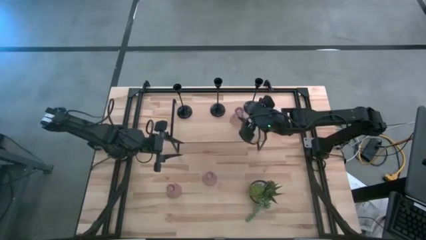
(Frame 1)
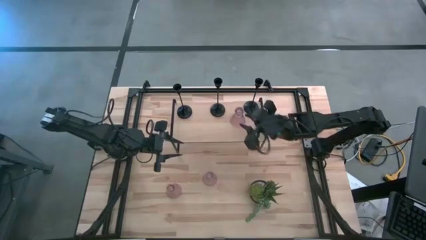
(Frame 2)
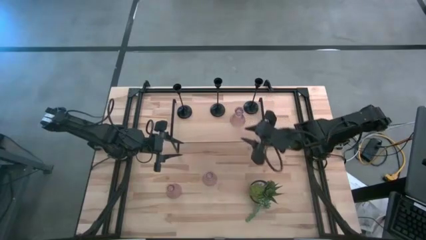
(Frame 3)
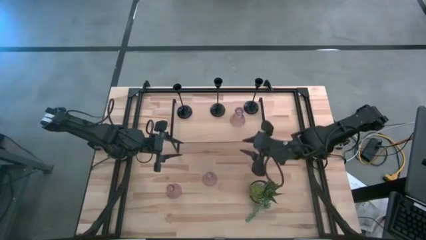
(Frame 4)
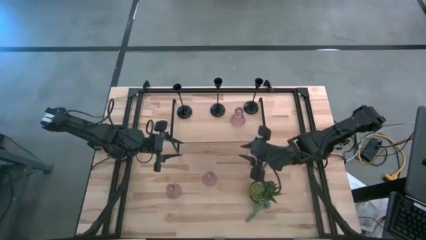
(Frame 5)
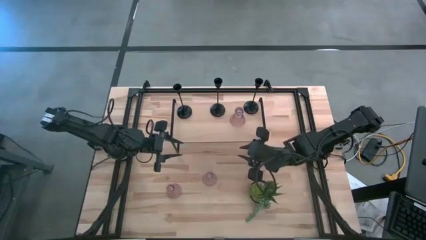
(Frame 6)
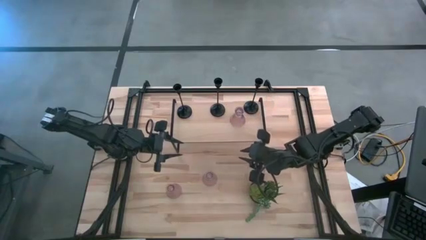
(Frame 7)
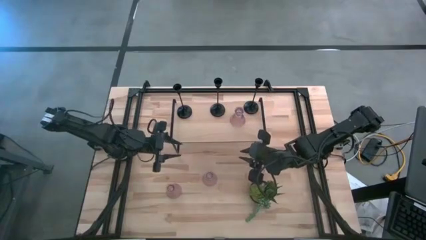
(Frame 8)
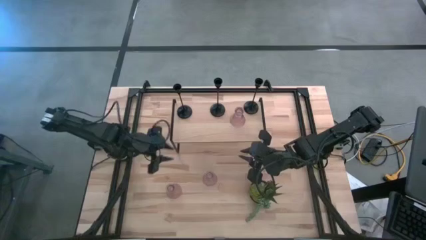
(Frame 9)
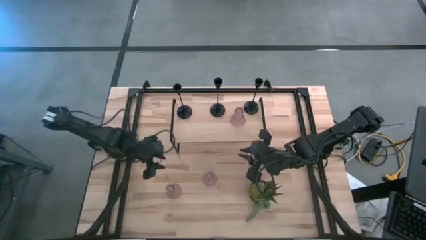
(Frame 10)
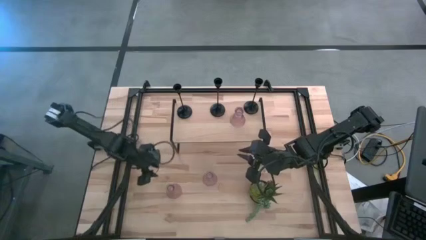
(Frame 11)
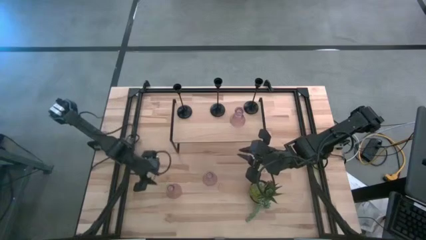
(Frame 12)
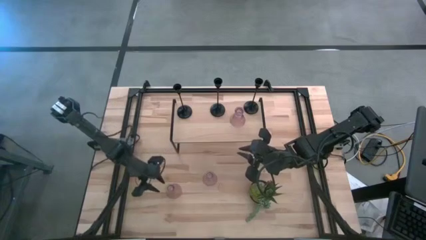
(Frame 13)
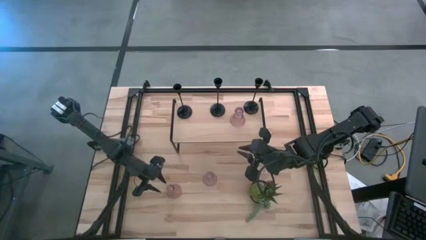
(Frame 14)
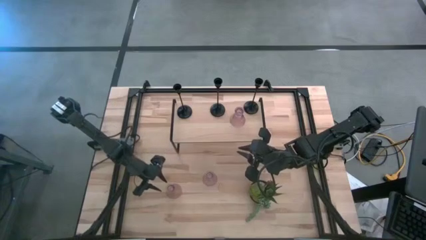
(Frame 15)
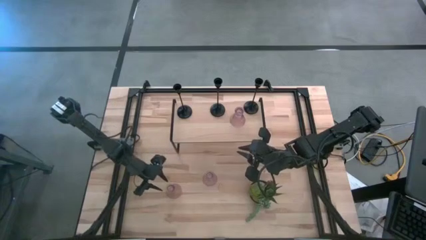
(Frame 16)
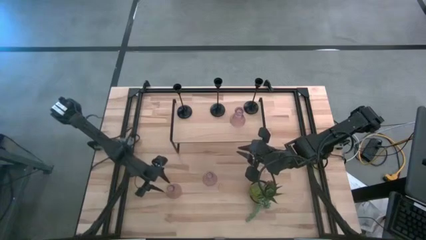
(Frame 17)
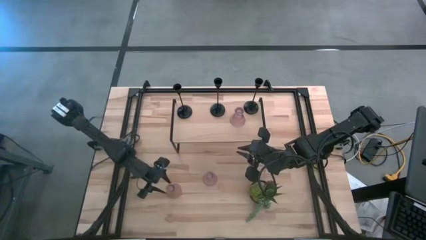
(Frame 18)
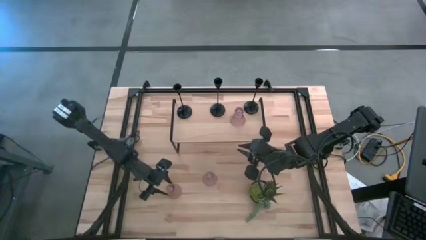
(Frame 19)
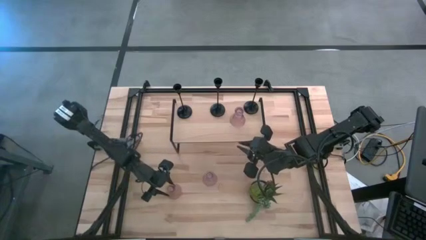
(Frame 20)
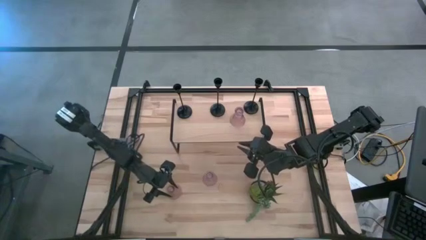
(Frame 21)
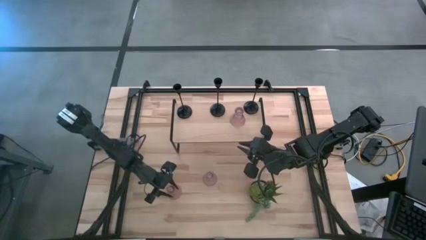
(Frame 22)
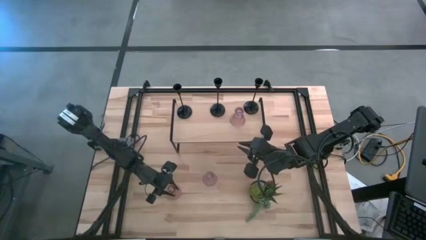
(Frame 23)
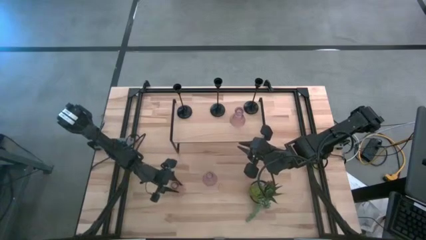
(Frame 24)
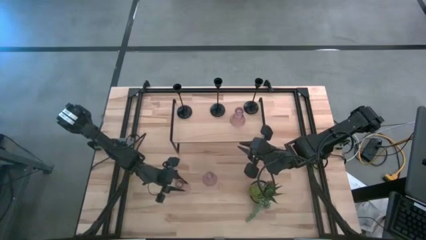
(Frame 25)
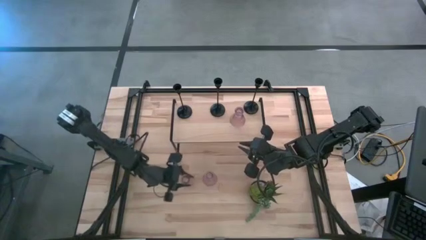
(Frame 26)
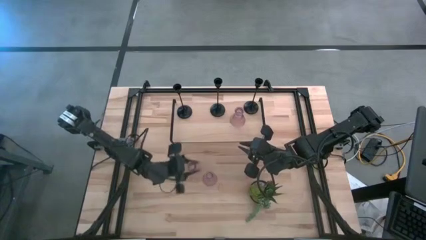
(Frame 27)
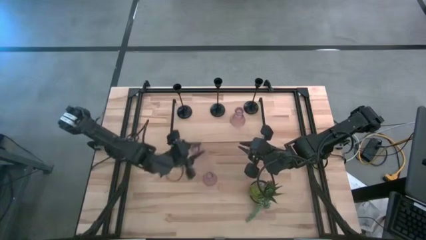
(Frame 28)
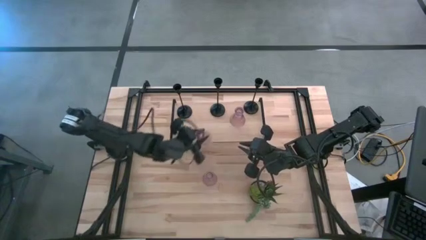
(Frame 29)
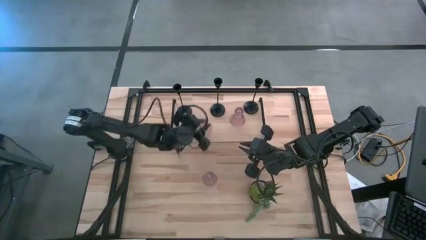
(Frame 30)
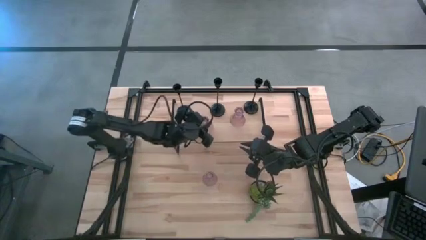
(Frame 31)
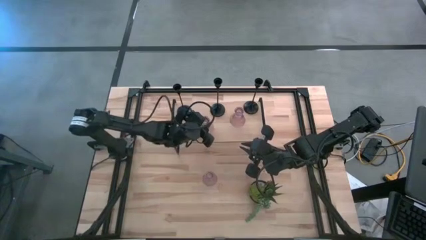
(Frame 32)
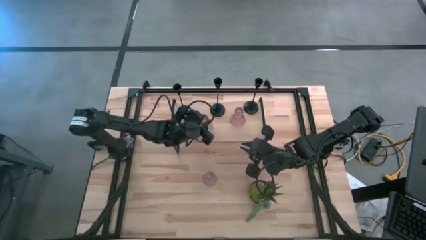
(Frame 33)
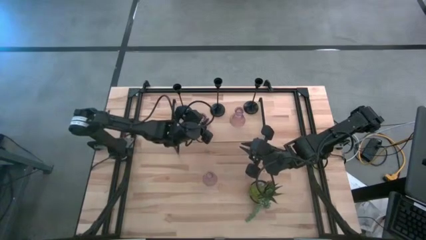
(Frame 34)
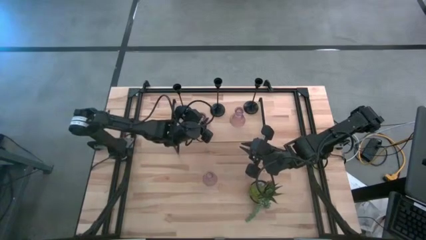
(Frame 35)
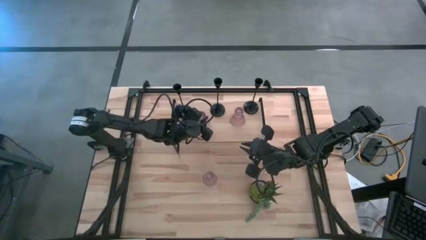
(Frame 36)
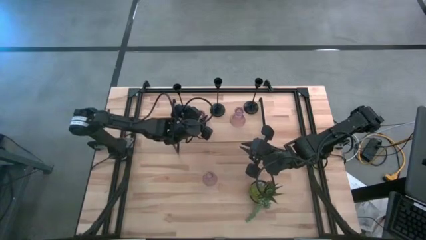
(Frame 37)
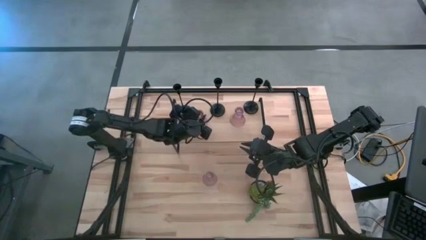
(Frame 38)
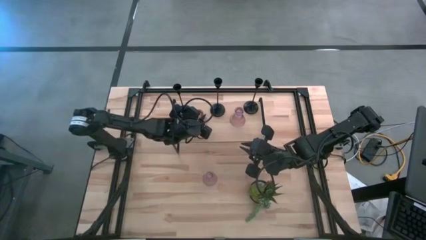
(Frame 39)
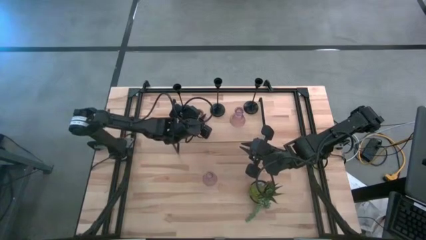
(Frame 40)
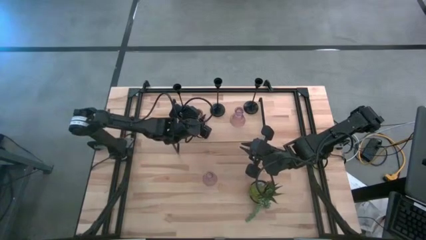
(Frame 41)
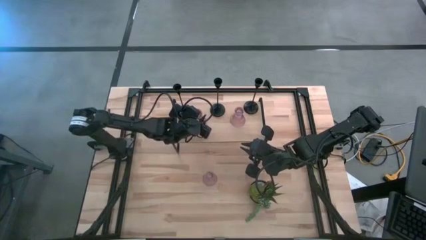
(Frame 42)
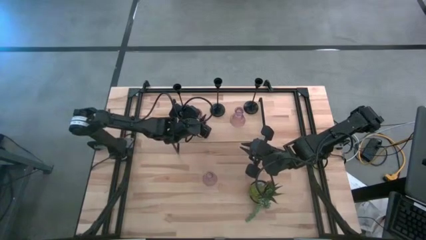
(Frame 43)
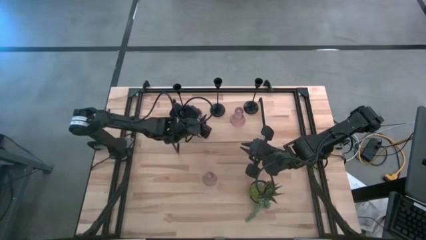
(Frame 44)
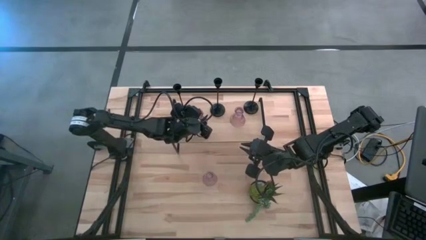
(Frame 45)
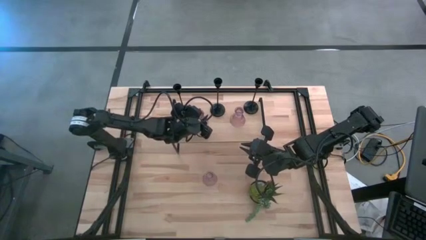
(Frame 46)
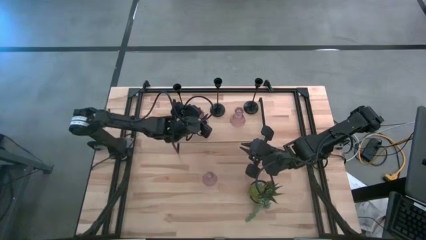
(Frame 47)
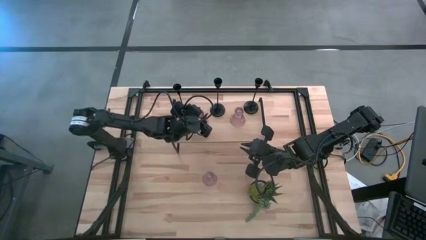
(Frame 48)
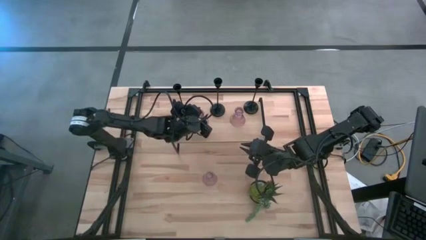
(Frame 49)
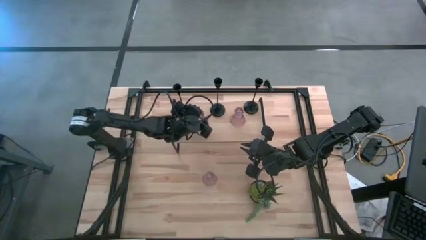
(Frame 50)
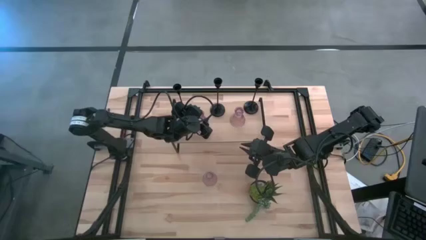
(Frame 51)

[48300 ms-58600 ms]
Task: Pick & Place candle stick holders
Put the left pink glass candle holder on the shelf

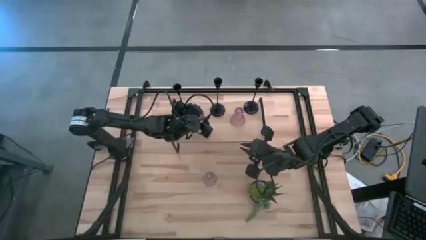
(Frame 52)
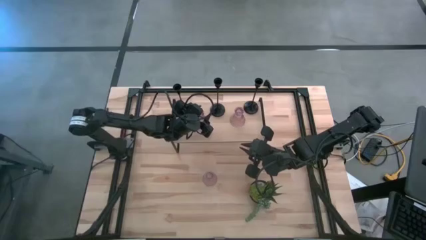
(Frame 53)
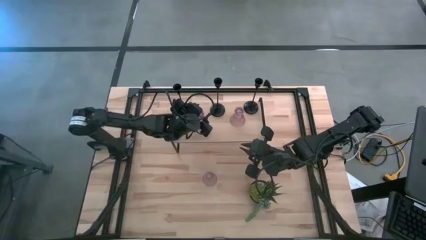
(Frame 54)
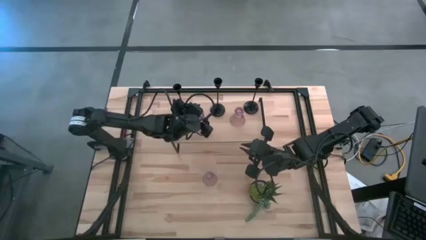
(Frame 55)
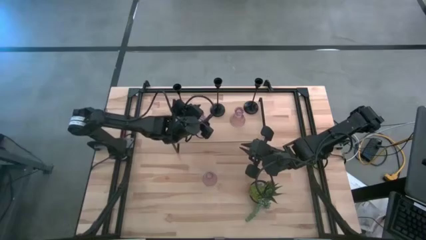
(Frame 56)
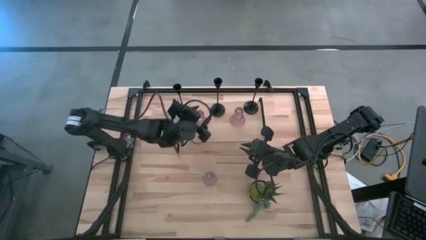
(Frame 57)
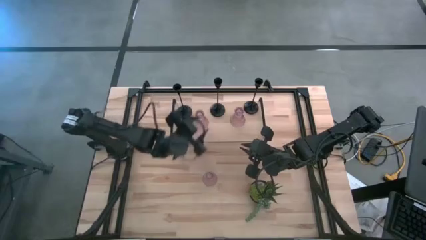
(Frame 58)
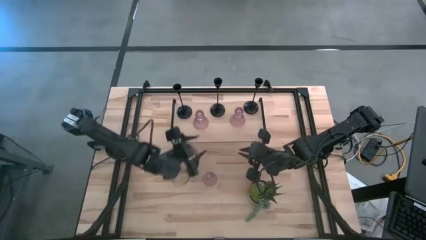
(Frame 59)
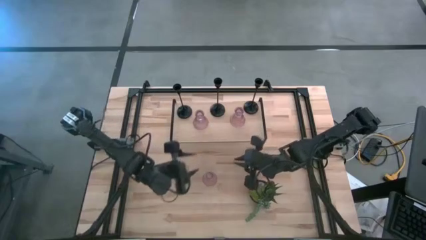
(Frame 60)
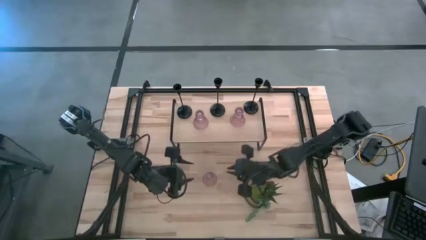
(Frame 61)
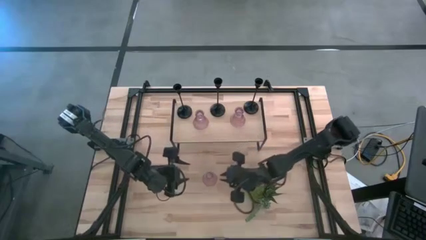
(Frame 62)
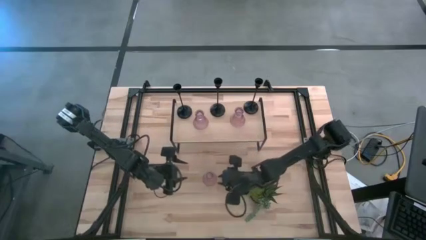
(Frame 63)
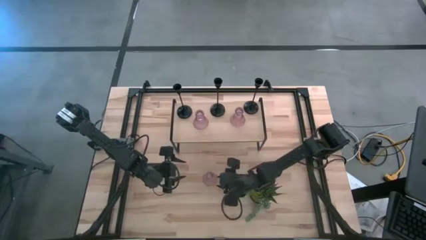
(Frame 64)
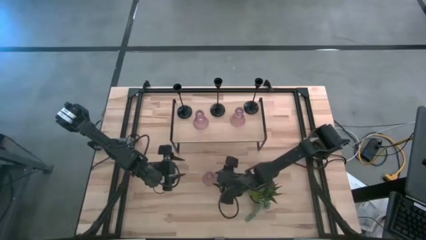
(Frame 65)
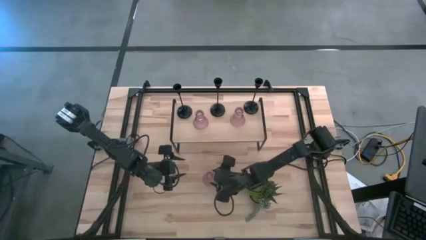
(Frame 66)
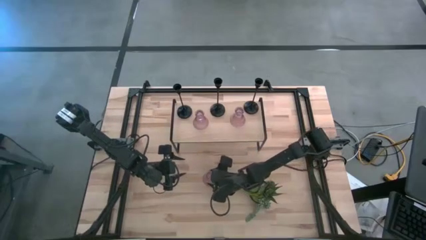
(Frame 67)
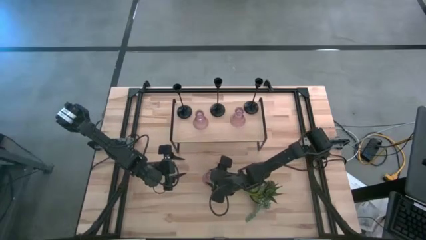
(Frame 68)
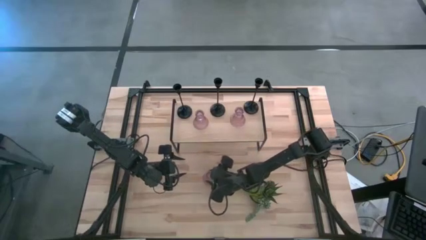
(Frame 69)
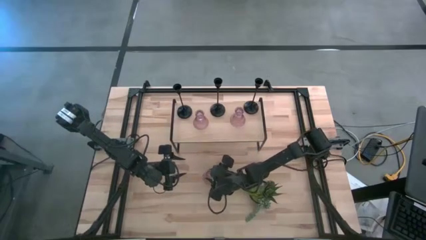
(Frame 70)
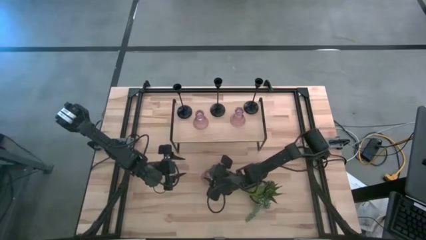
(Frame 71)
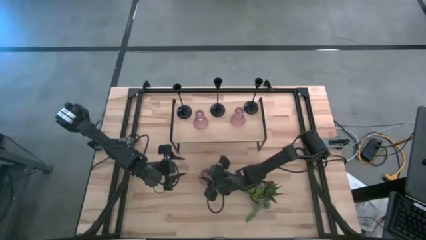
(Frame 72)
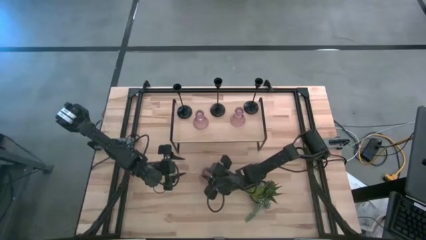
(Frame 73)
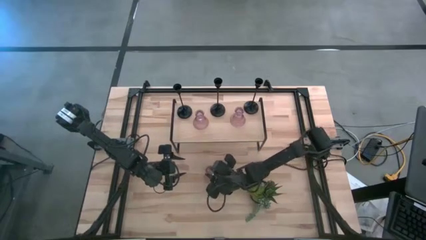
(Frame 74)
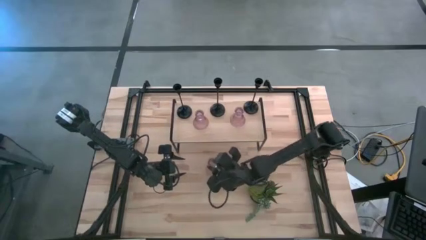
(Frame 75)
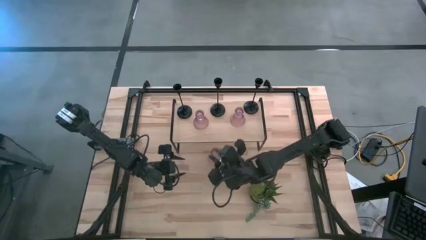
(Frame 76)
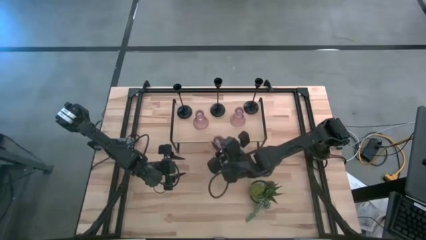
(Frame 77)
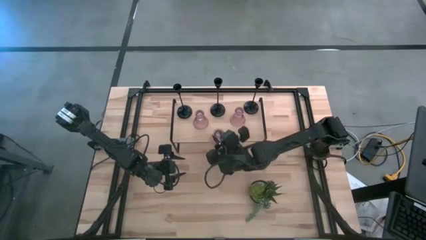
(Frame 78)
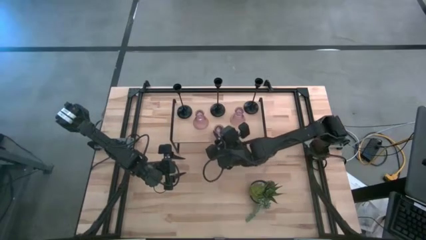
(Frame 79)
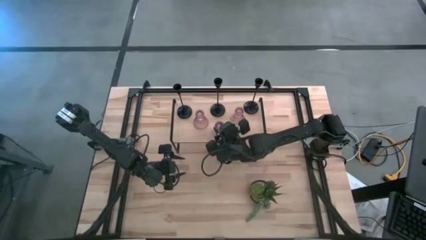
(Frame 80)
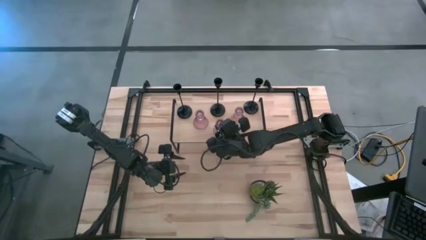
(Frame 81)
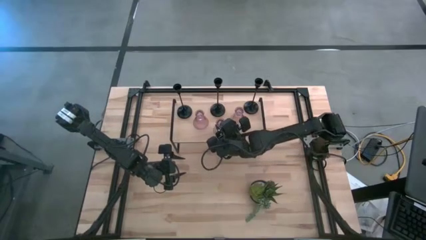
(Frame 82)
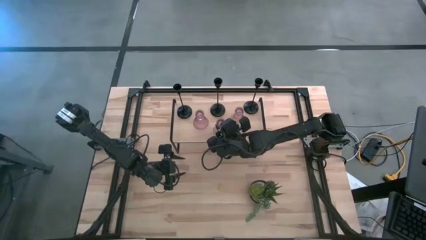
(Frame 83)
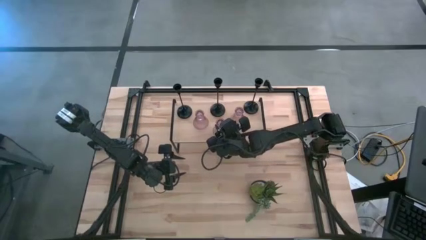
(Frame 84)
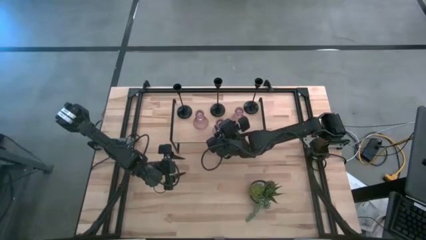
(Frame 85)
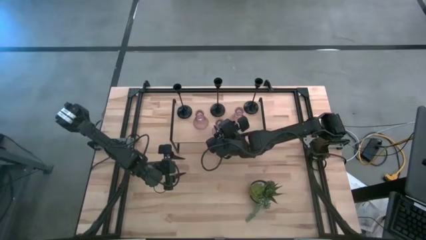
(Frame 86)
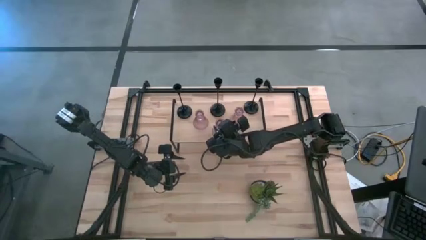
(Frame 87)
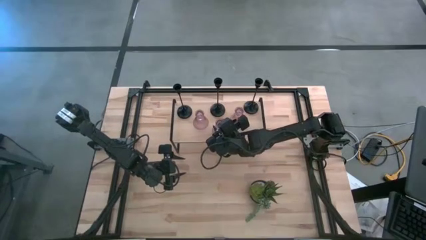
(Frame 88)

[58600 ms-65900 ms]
Put the pink glass candle holder on the shelf
